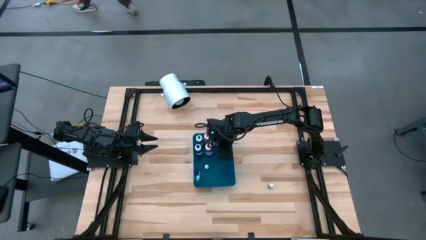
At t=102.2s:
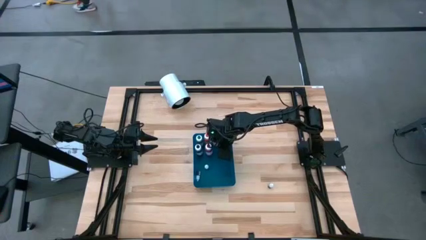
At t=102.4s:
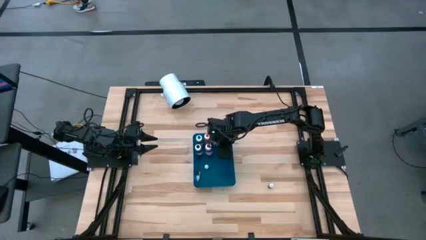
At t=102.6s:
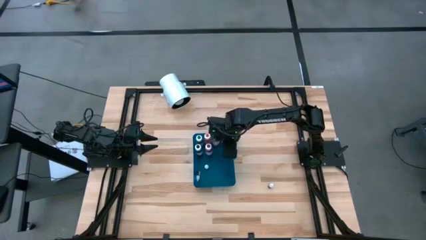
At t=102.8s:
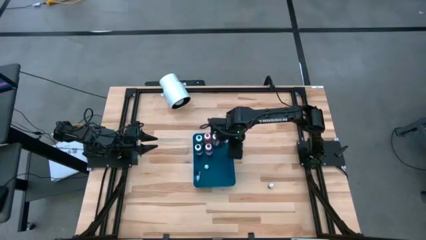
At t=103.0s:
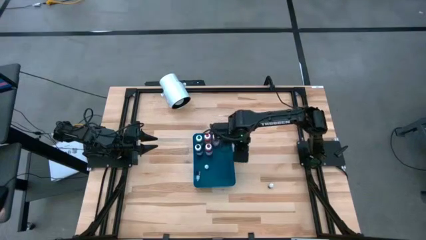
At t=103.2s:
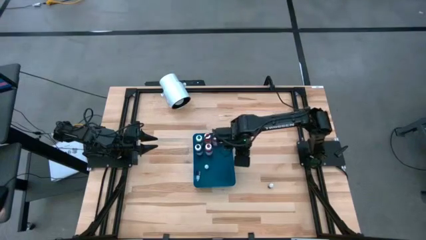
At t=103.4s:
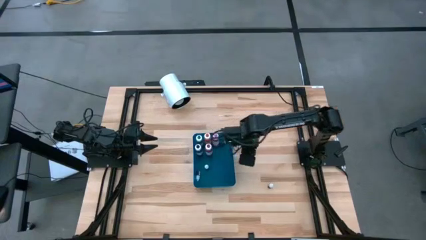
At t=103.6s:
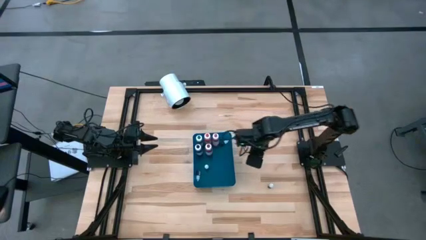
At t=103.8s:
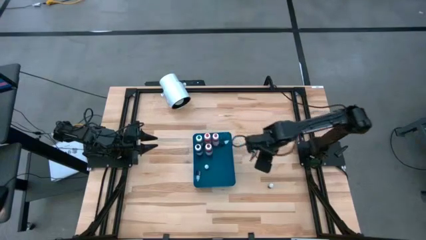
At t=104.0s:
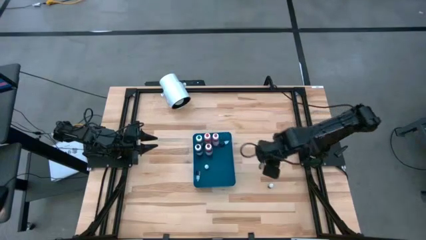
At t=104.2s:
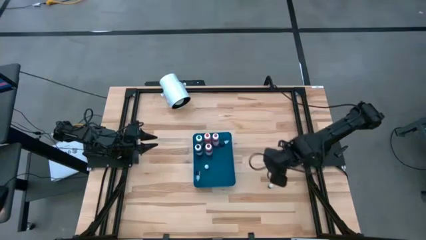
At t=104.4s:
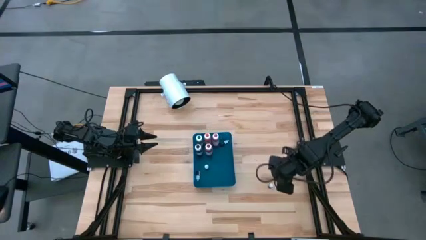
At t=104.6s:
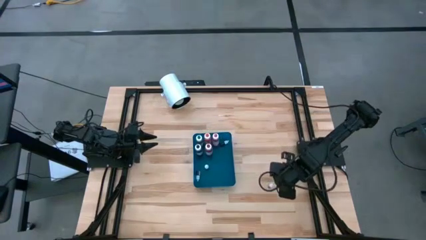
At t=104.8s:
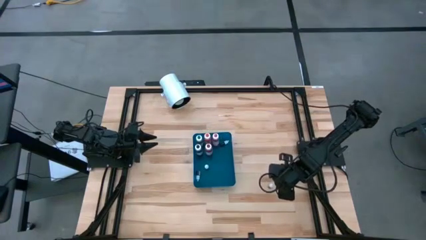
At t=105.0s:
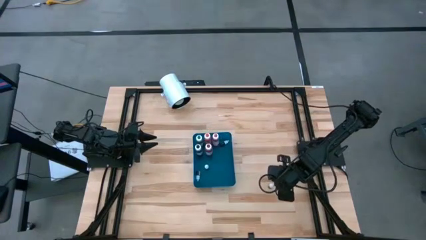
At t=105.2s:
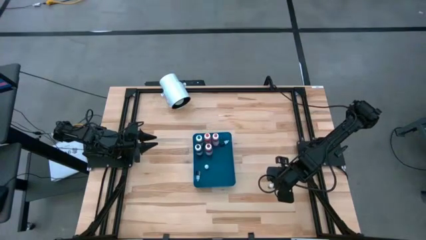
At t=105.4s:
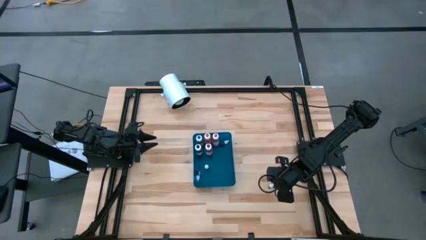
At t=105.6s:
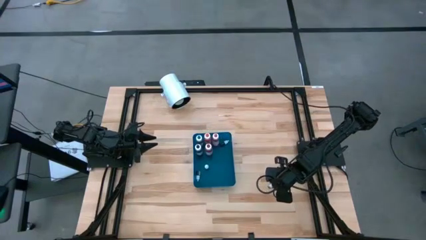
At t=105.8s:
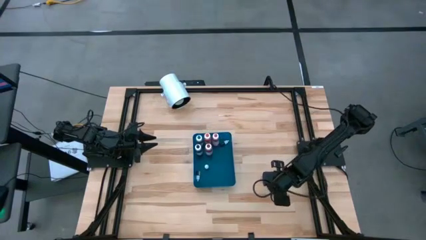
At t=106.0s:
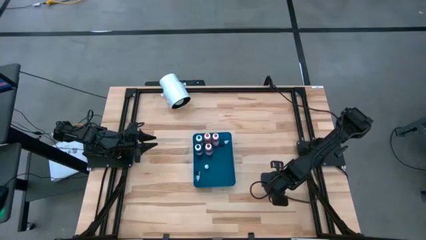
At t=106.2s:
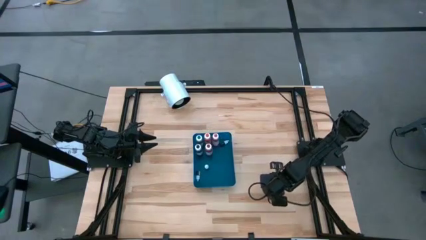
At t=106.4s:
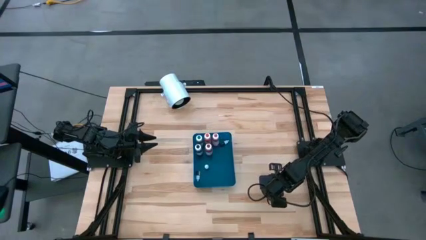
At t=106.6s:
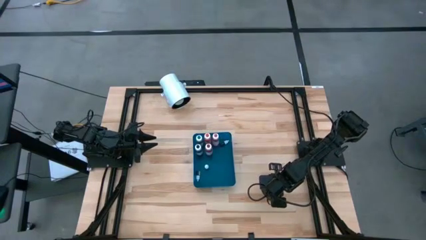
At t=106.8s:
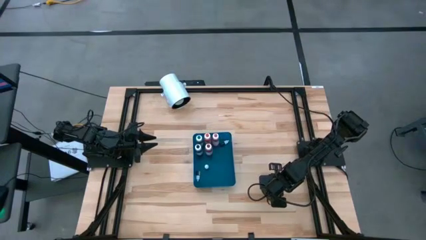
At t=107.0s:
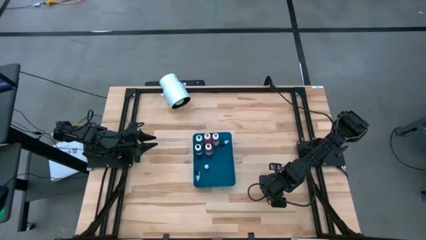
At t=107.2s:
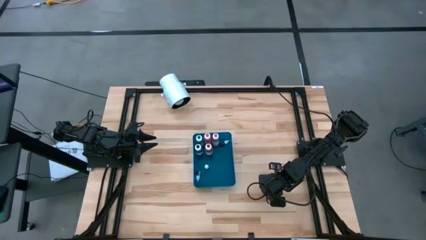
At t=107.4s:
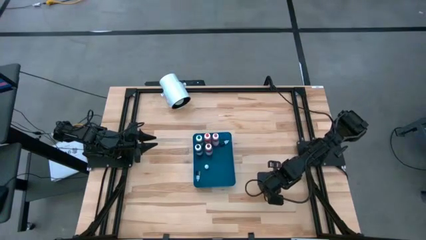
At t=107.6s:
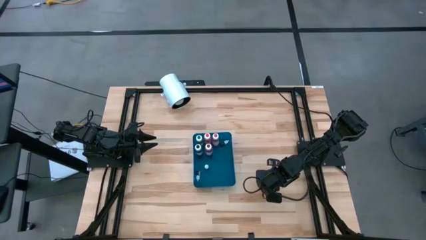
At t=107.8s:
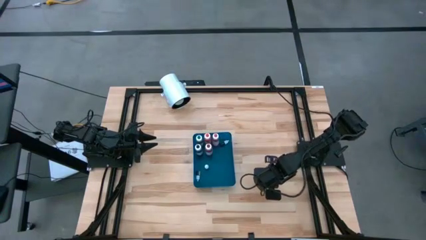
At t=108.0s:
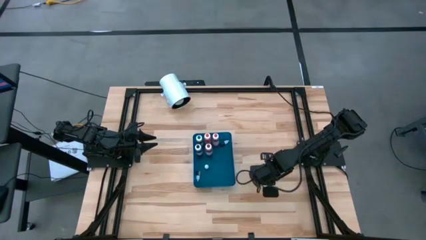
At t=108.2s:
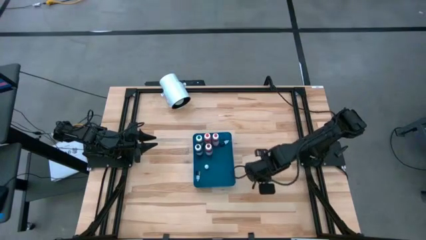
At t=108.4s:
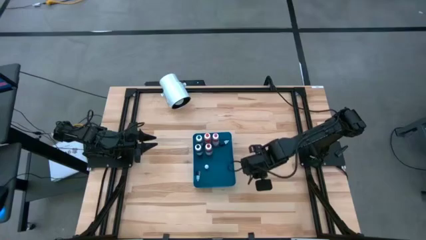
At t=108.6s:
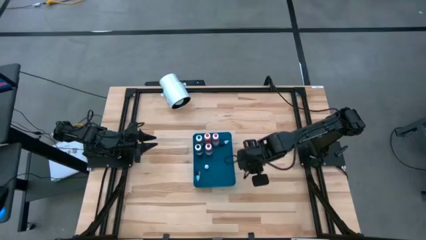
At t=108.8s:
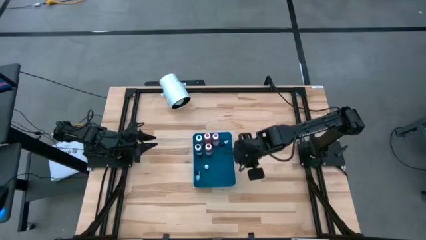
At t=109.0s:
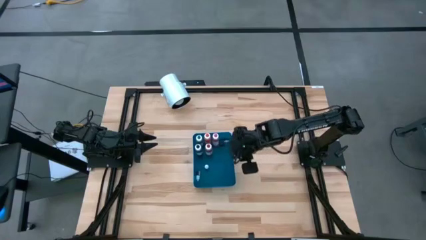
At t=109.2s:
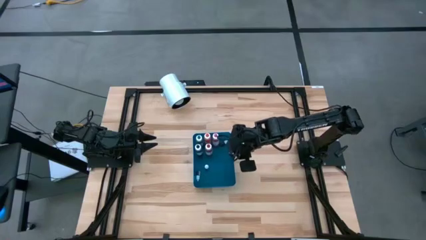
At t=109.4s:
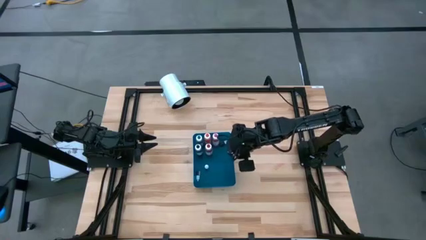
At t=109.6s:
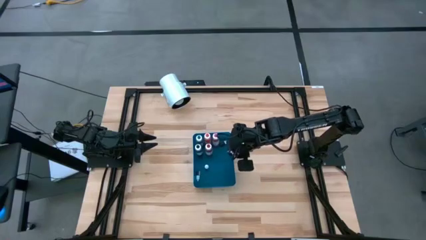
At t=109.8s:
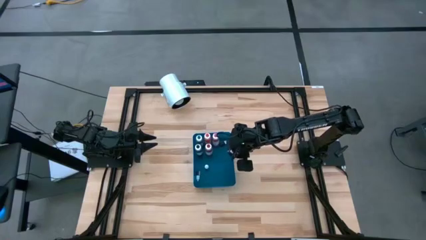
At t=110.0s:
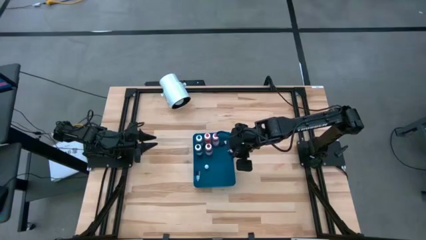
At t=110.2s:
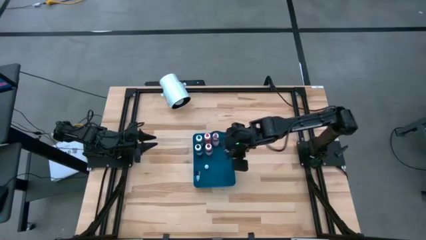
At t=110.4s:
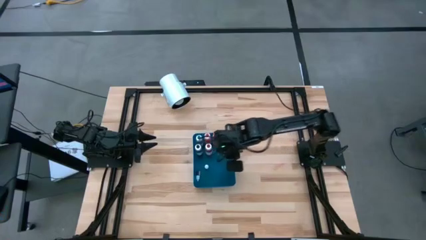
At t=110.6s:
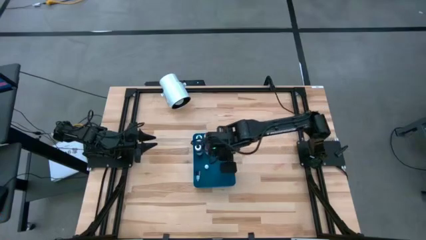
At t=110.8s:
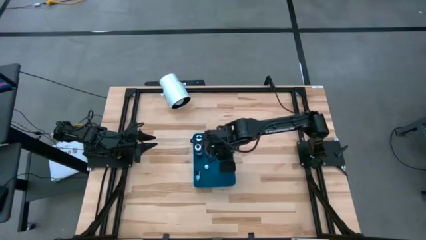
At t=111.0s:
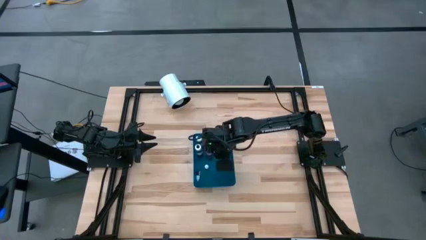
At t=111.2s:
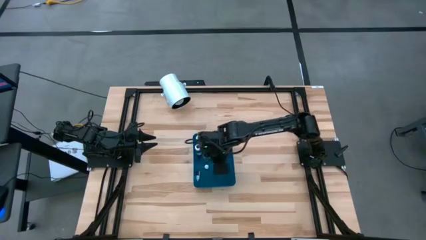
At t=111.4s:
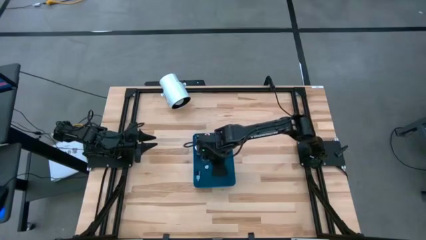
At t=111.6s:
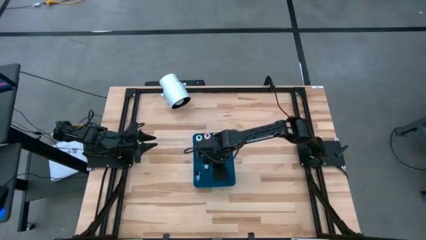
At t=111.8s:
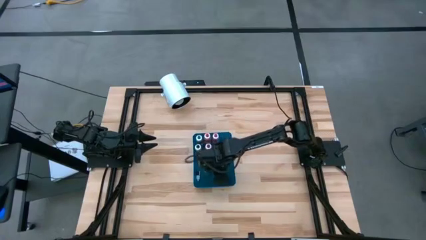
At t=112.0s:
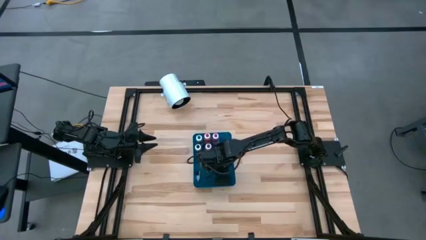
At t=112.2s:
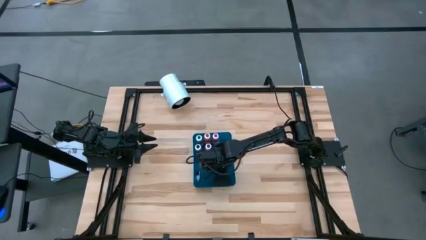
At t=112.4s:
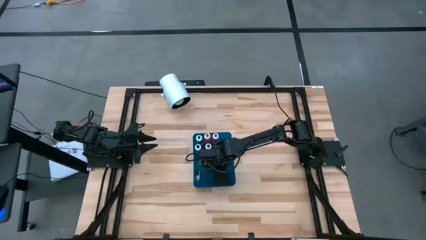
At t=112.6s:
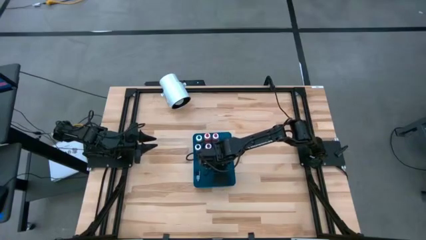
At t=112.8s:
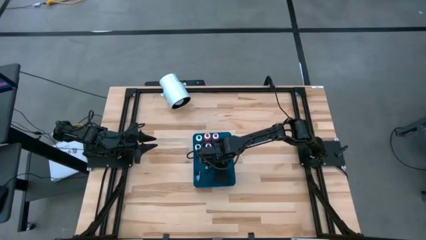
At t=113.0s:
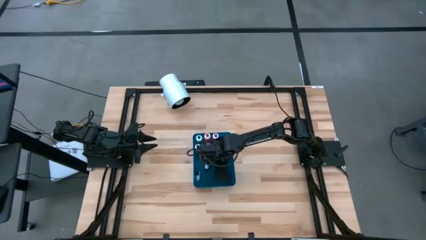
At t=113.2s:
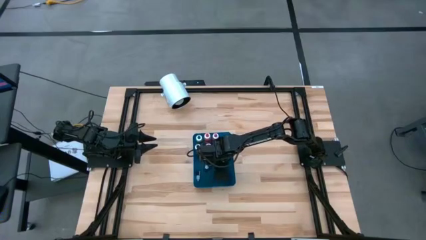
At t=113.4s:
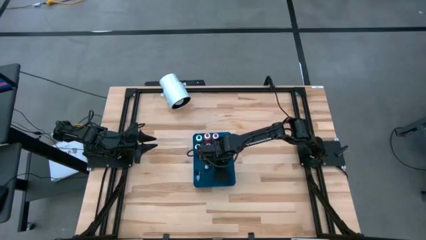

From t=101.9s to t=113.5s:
Task: Pick & Place food coloring
Put the small black food coloring bottle into the blue bin

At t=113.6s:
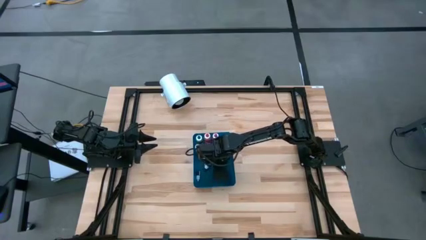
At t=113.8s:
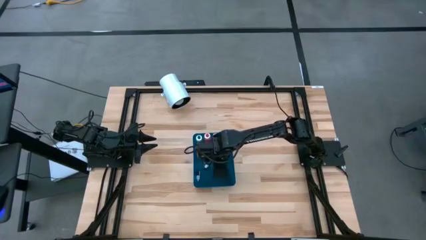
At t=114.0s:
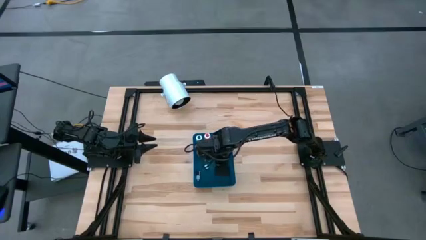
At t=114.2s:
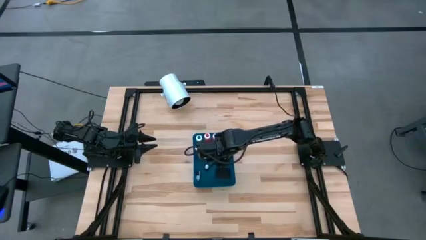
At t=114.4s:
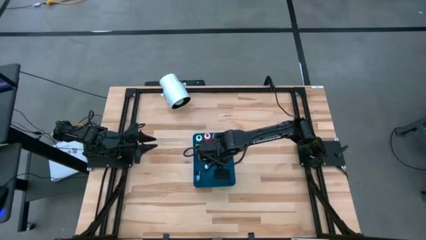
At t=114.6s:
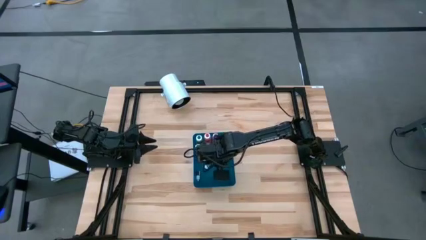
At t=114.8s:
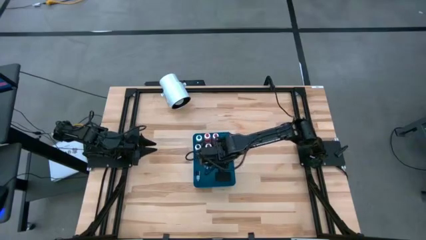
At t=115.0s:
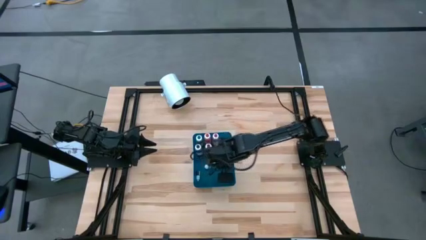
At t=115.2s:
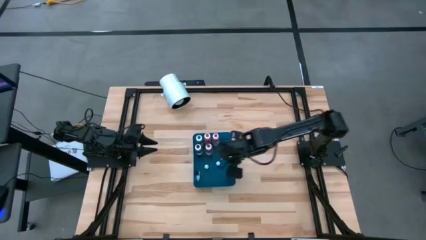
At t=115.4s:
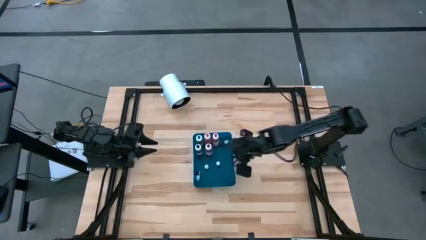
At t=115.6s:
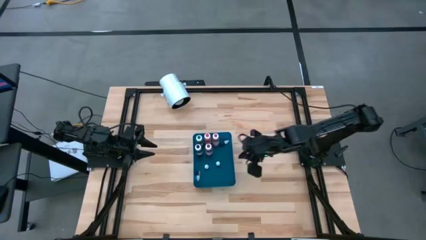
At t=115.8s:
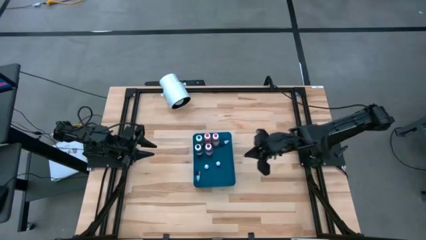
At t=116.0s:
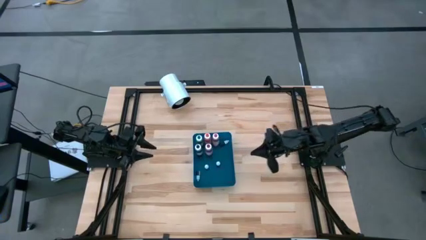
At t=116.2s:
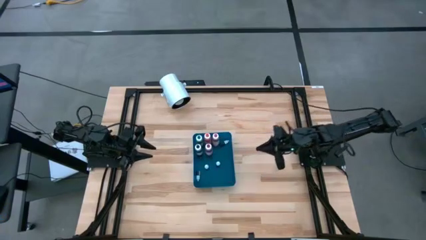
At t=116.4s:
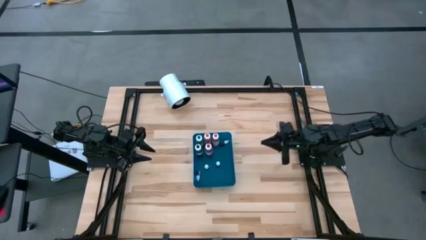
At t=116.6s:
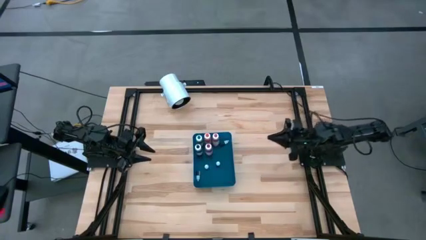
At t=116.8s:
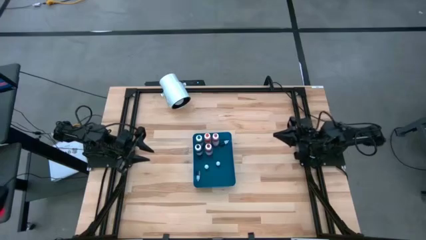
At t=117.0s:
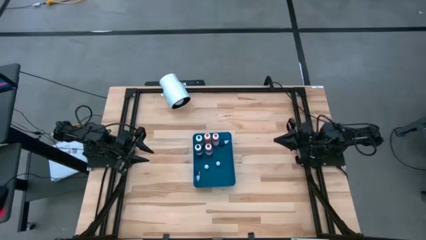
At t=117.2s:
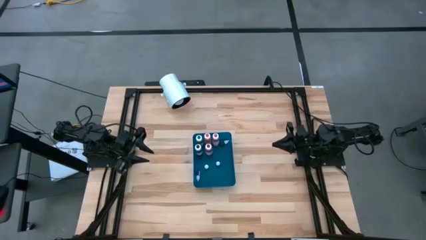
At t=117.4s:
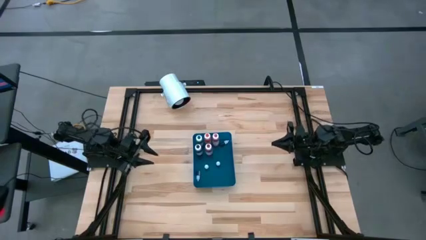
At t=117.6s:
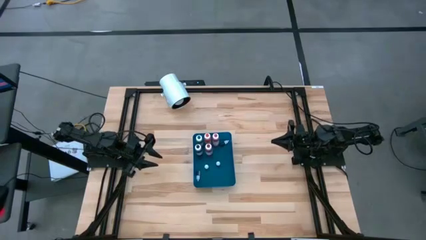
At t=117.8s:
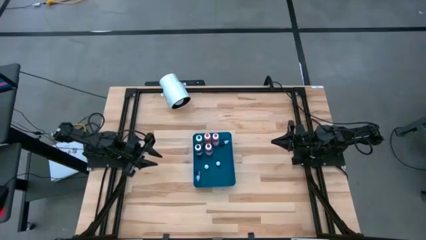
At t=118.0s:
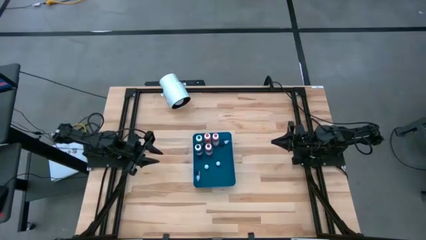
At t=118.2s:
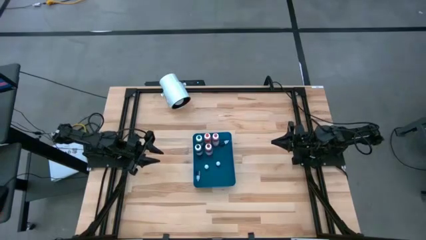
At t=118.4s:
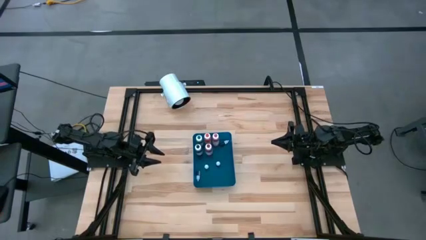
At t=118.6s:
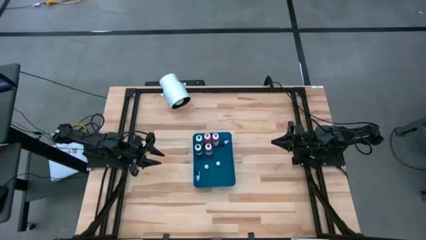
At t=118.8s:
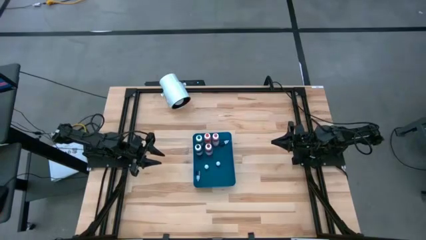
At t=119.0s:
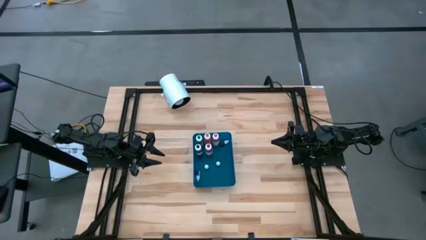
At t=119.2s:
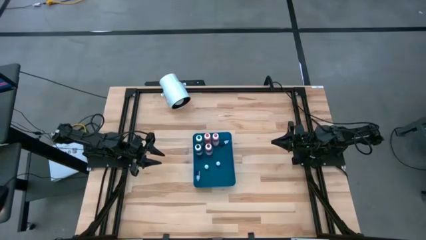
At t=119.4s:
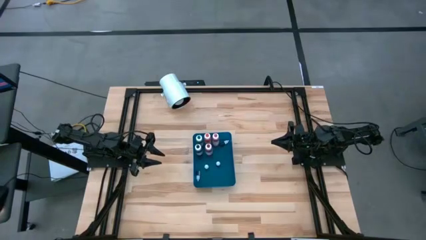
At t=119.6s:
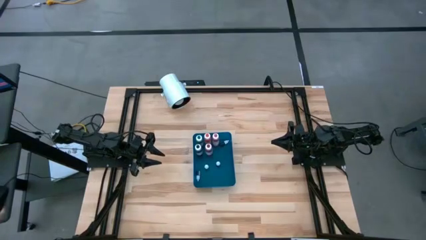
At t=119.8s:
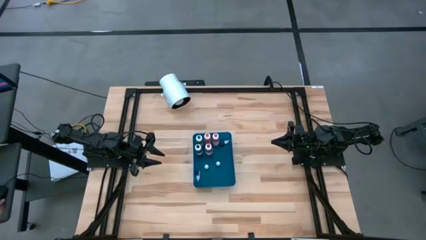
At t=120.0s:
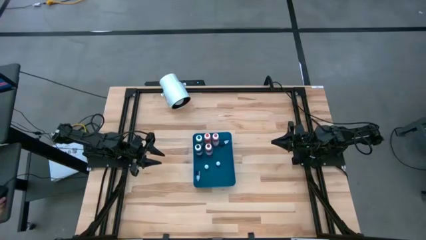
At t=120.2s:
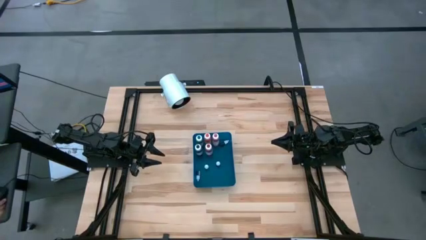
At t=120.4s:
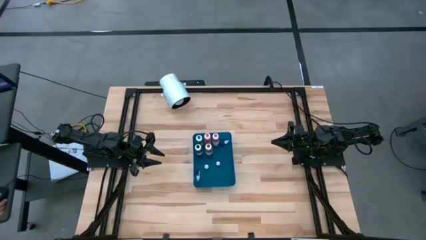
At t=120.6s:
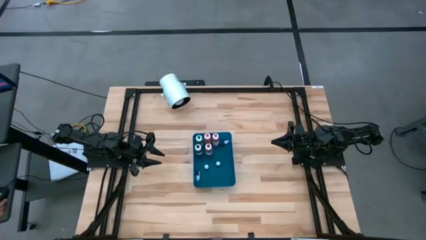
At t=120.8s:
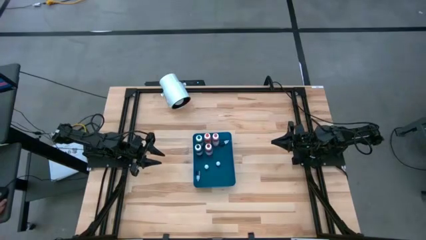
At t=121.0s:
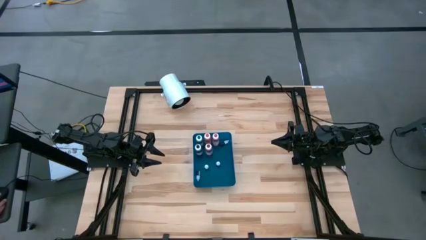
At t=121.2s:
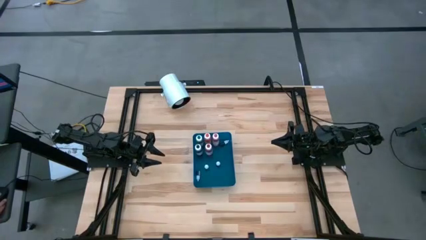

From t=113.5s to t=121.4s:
Return to Home Position
